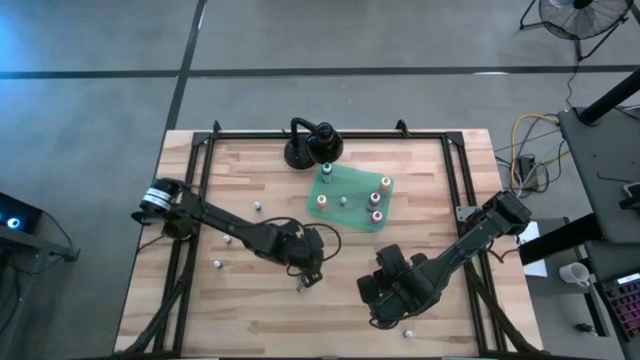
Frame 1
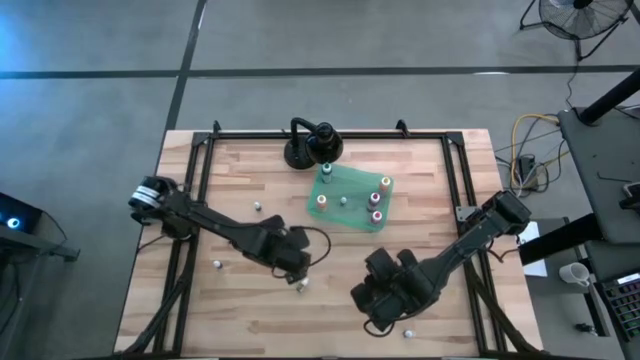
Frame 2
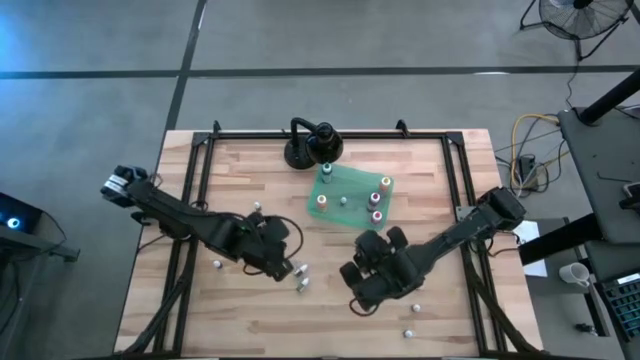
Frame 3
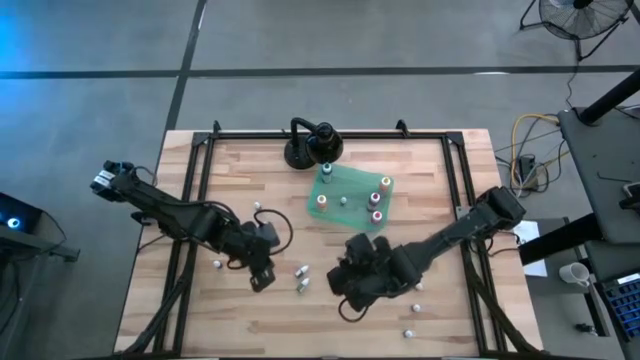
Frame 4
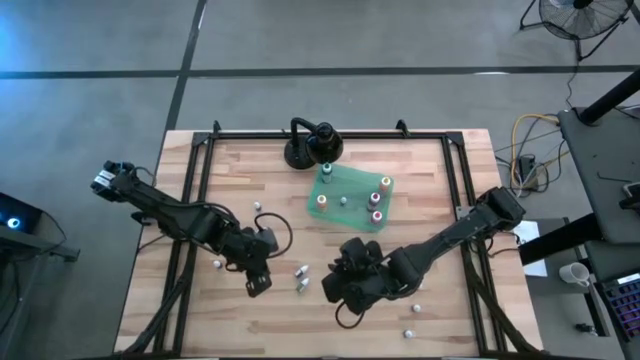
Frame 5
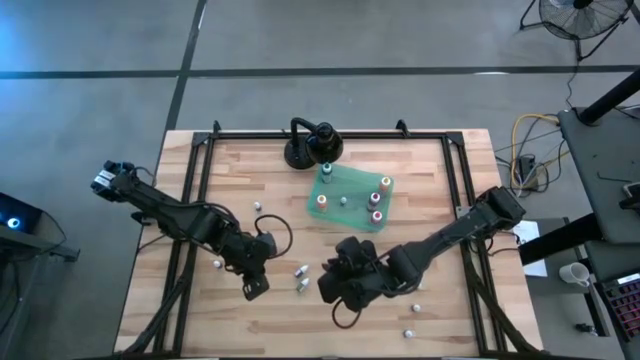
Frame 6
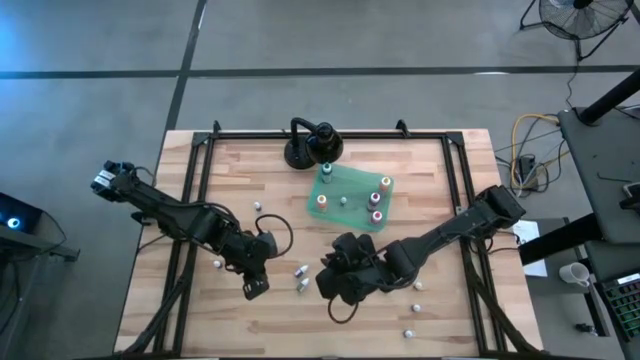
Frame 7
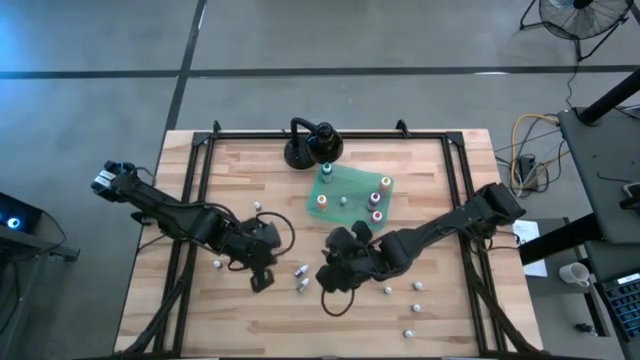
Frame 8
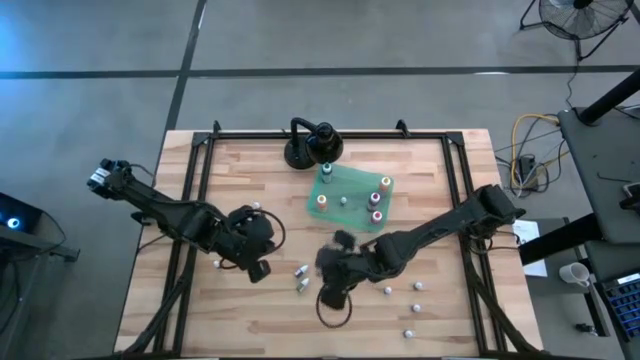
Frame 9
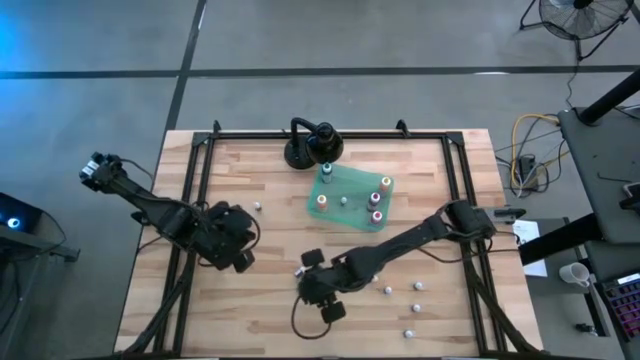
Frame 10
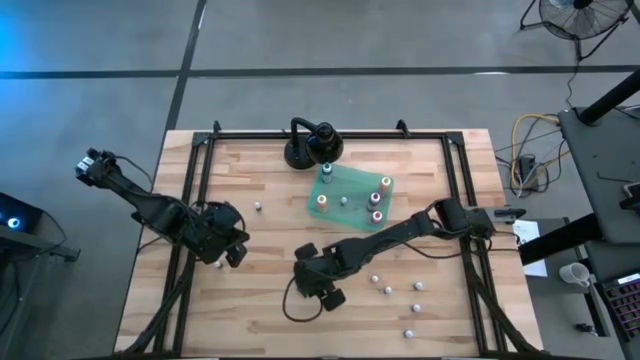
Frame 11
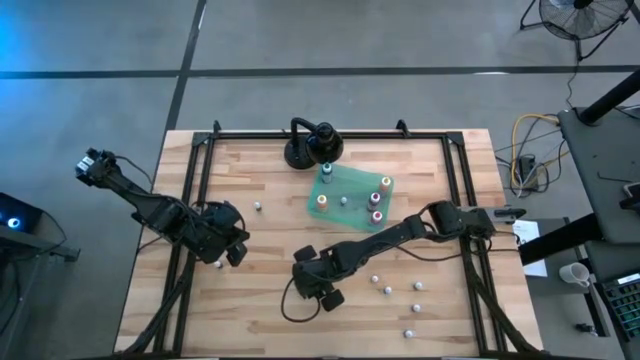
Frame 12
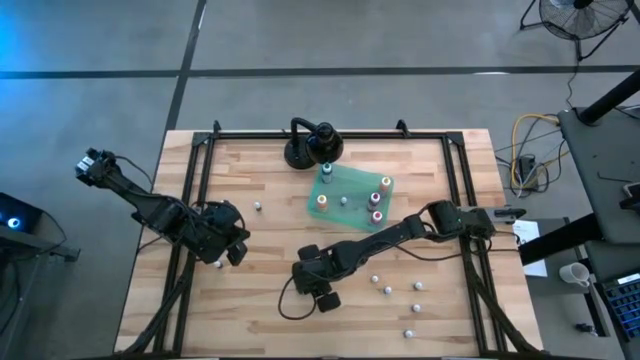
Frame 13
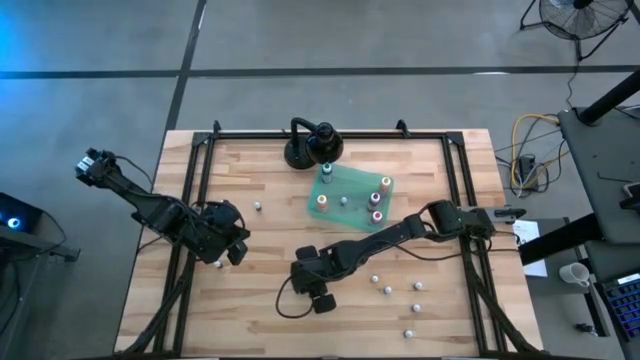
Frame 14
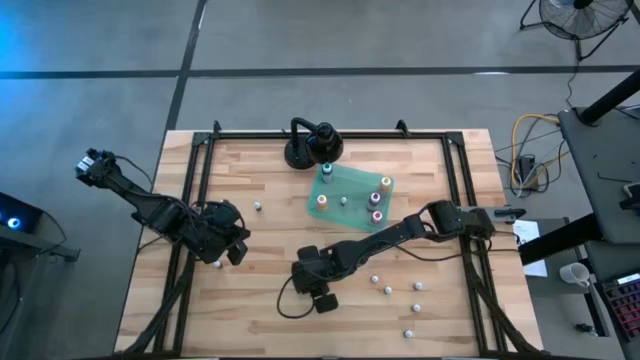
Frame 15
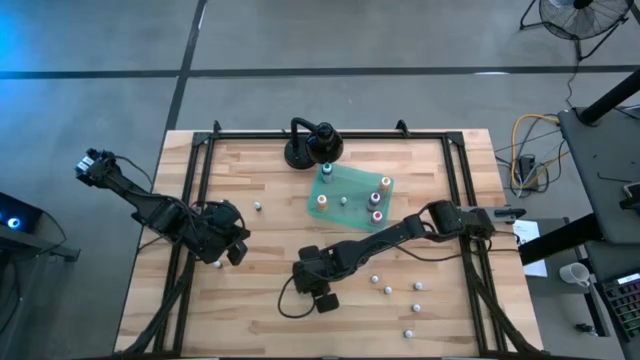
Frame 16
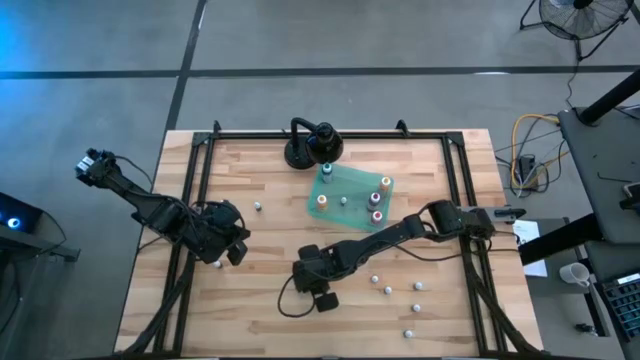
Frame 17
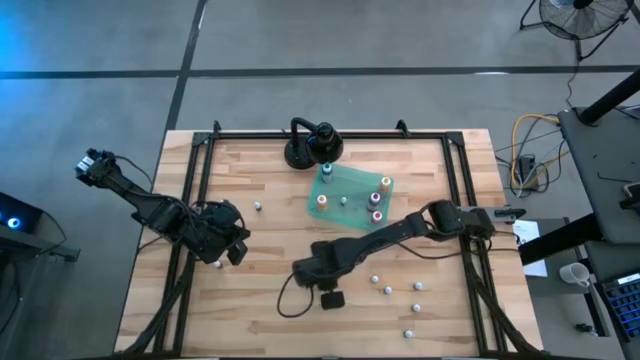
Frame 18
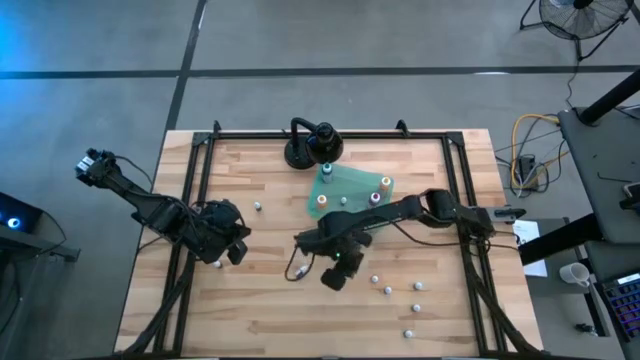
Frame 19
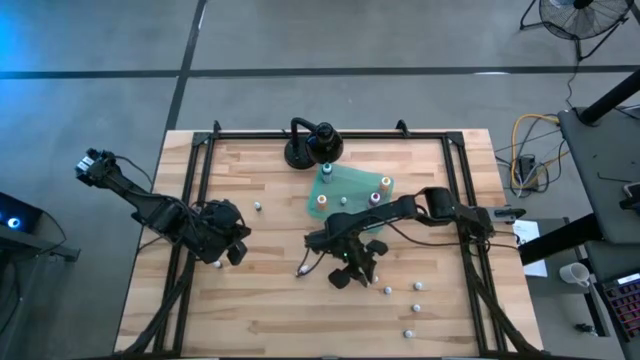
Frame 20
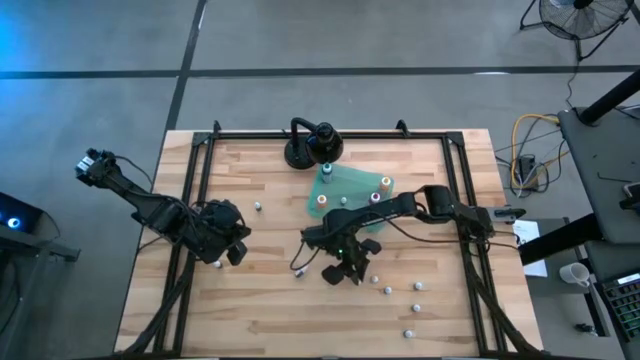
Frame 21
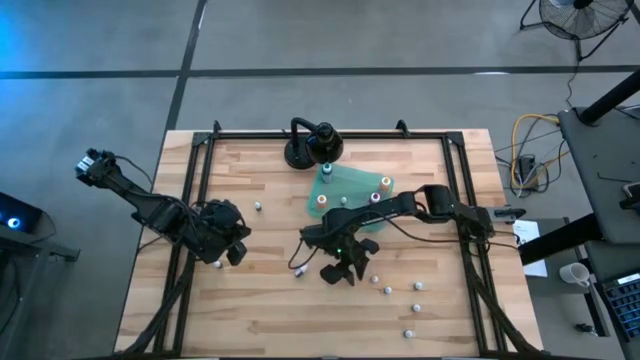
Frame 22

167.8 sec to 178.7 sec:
Task: Pick & Place food coloring
Move the green food coloring bottle to the middle left of the table

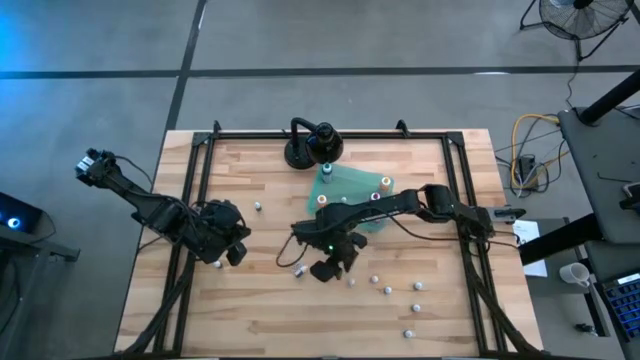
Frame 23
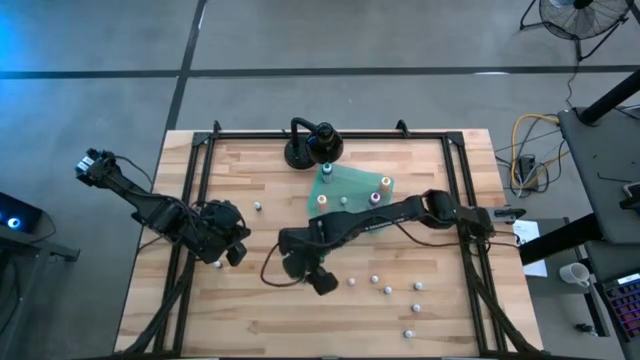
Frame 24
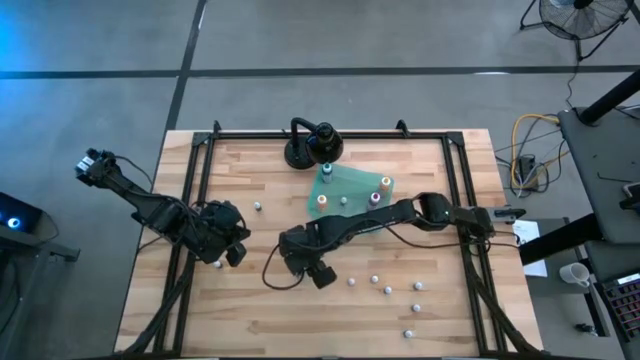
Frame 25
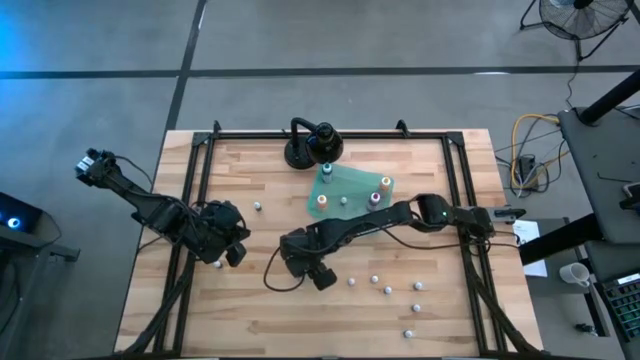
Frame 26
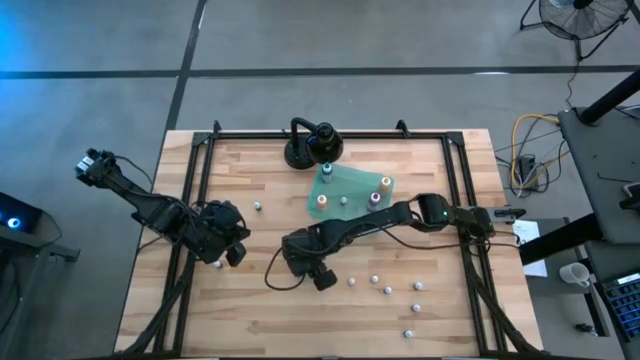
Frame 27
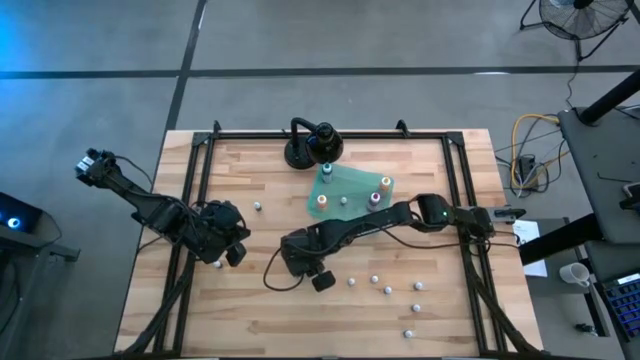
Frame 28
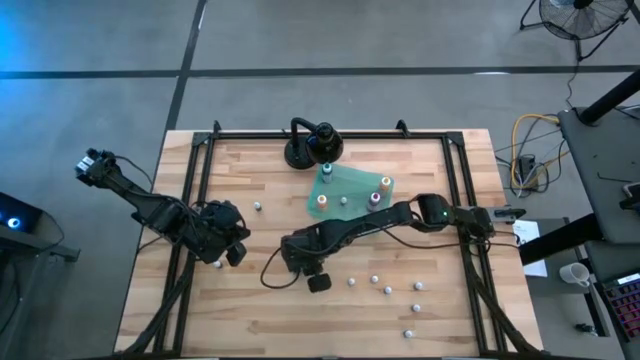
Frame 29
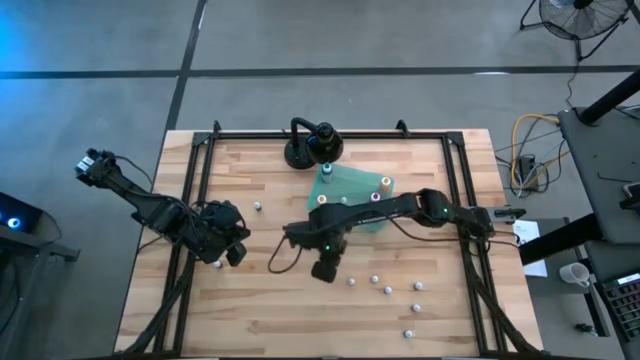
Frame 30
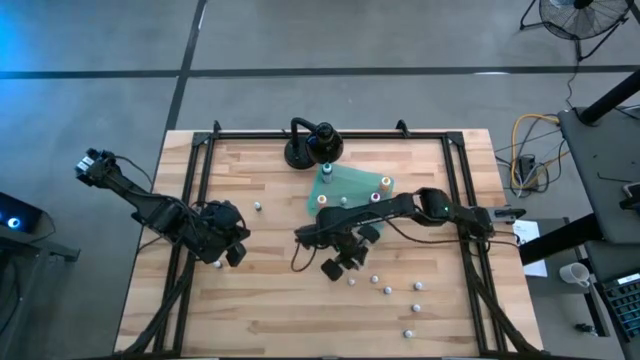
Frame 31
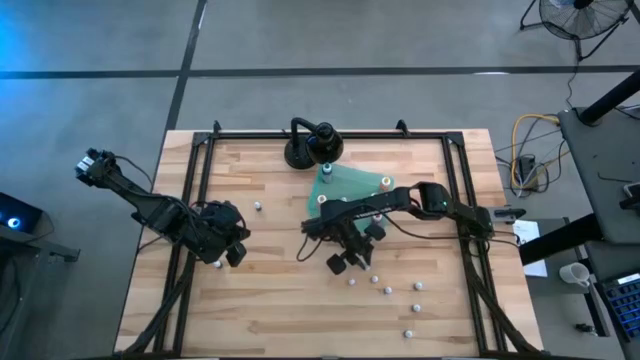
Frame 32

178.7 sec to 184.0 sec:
Move the red food coloring bottle to the middle of the table

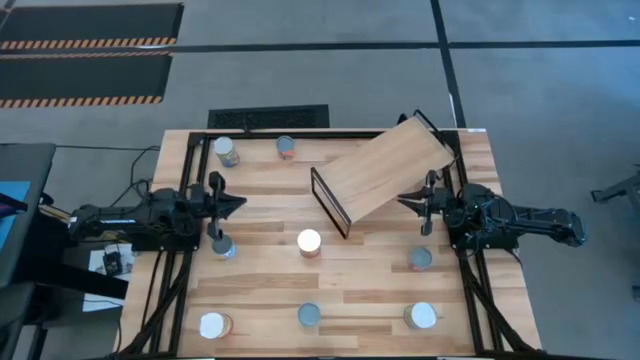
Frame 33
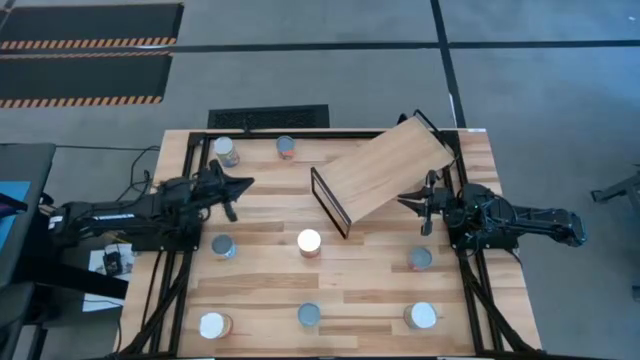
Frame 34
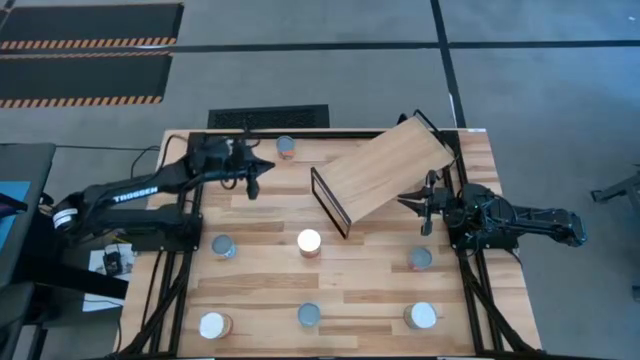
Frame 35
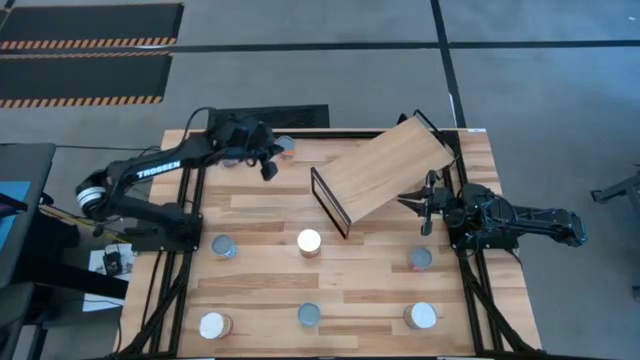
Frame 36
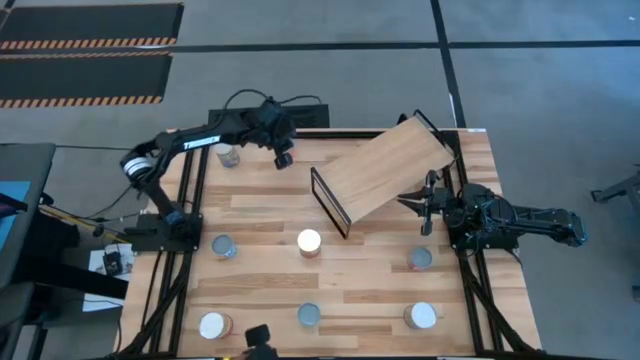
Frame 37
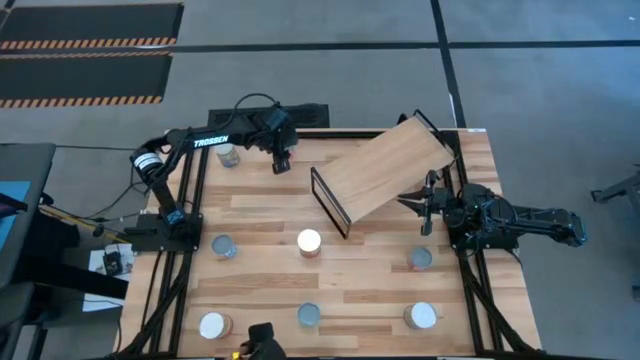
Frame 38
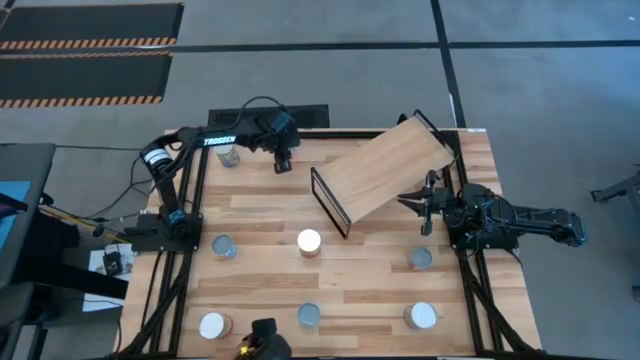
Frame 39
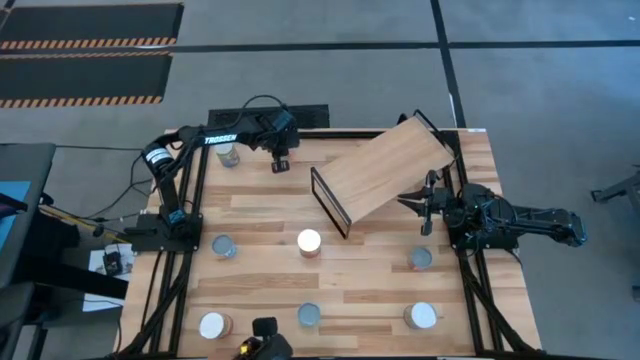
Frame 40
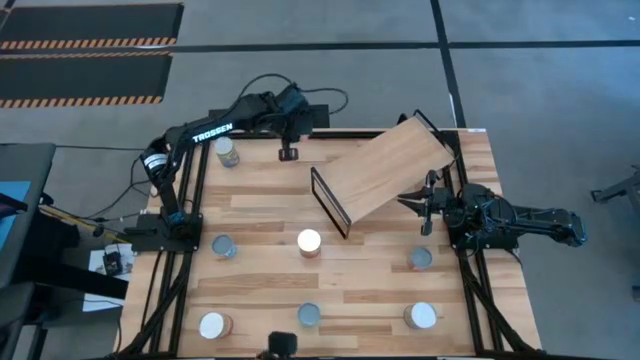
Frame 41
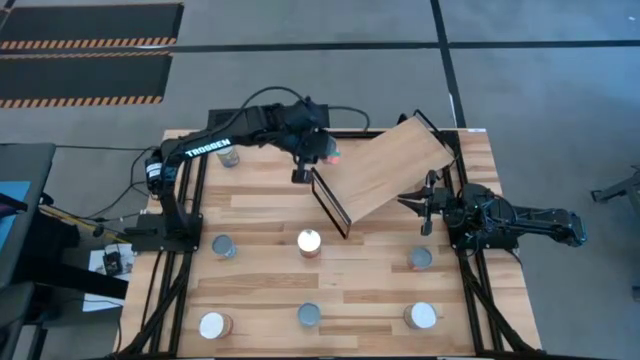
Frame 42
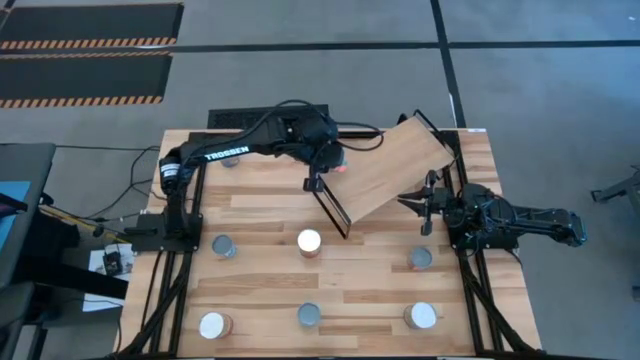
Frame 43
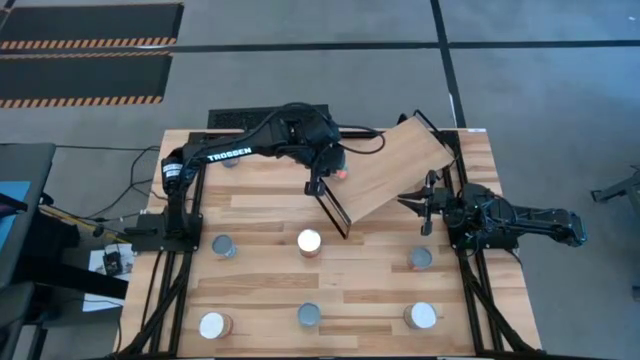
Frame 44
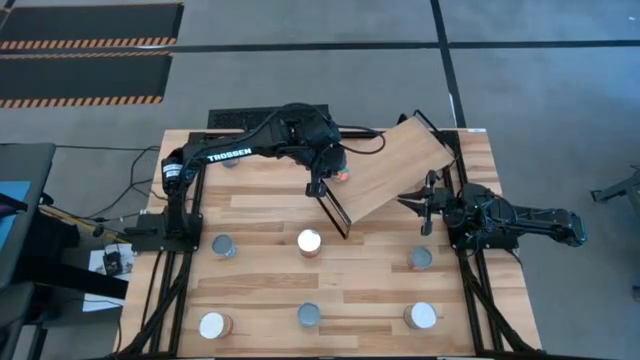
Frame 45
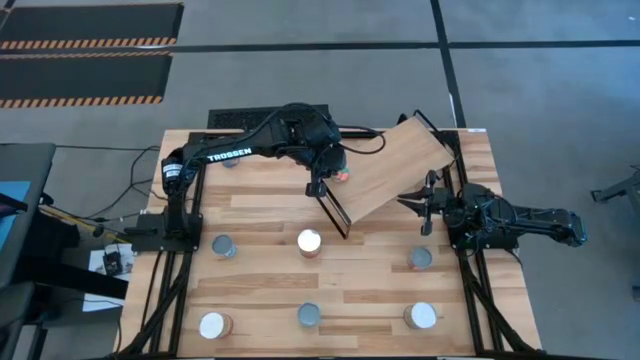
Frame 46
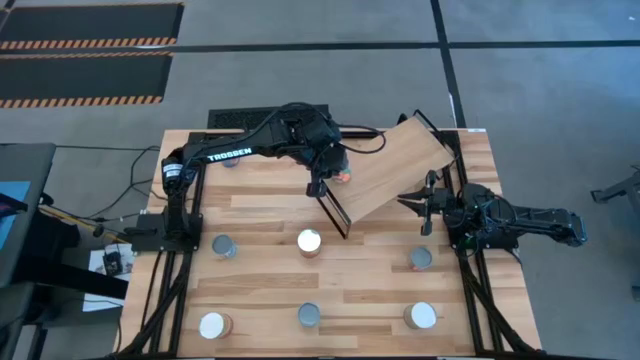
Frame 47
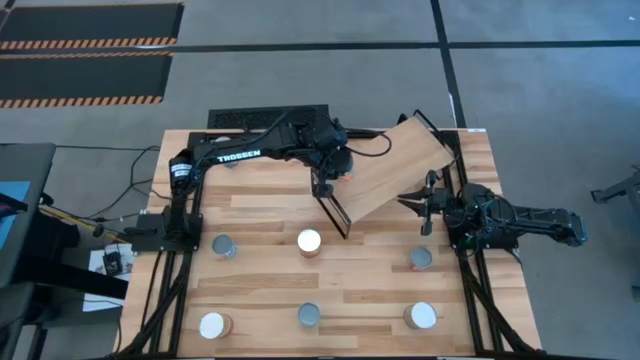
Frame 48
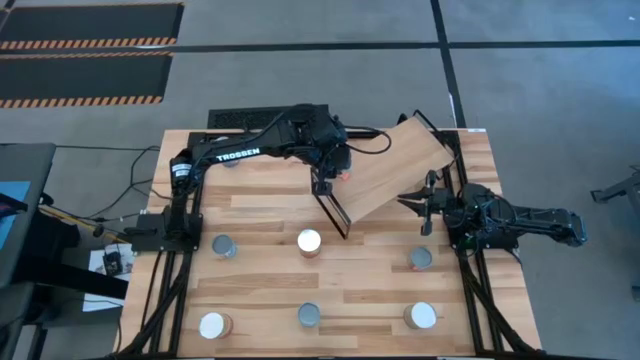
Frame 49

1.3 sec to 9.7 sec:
Task: Pick and place cans onto a shelf
Put the canned oranges on the shelf
